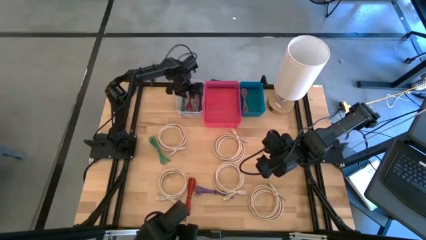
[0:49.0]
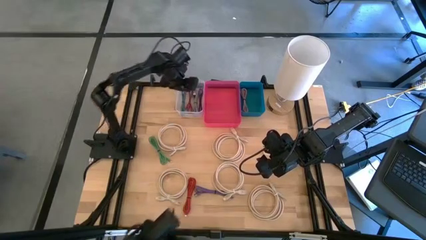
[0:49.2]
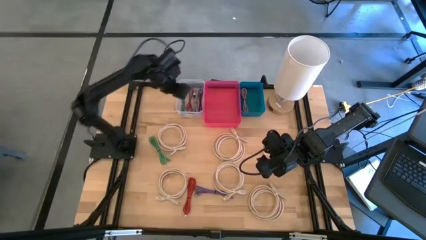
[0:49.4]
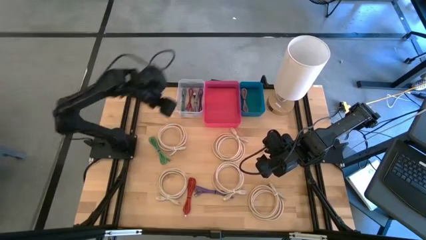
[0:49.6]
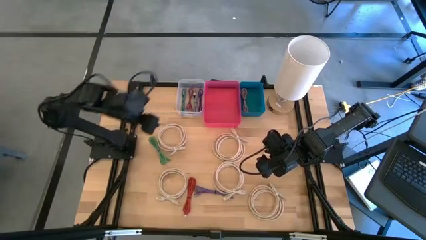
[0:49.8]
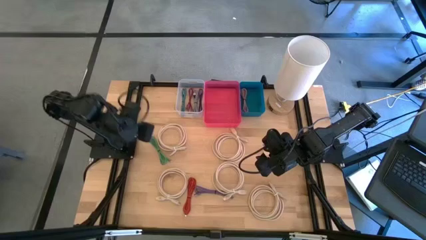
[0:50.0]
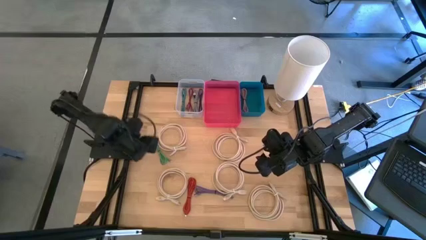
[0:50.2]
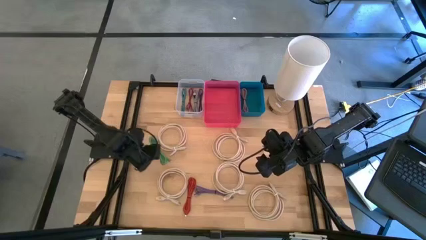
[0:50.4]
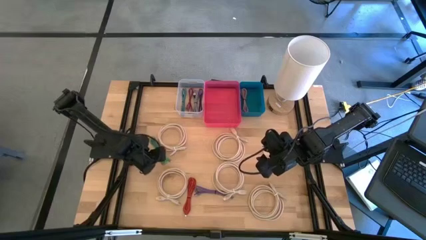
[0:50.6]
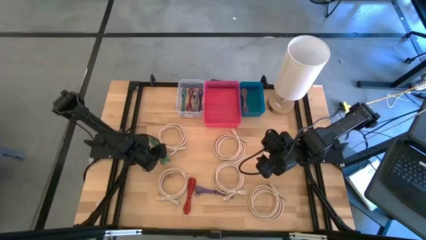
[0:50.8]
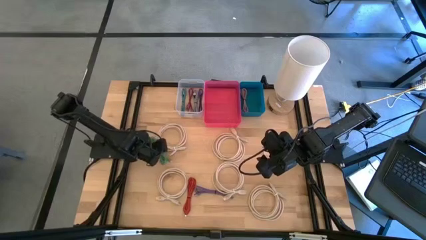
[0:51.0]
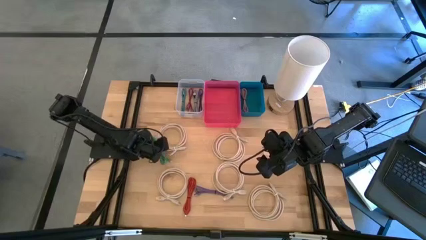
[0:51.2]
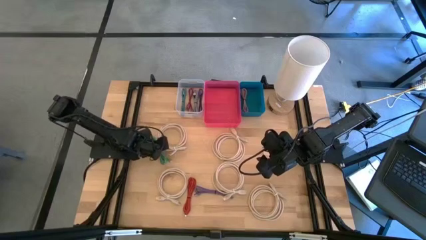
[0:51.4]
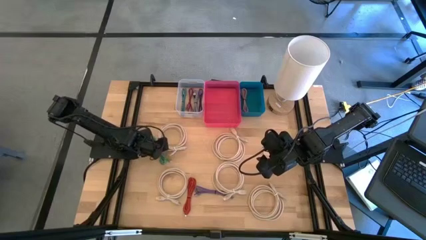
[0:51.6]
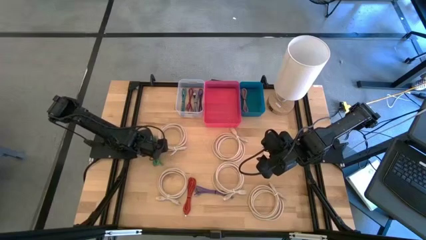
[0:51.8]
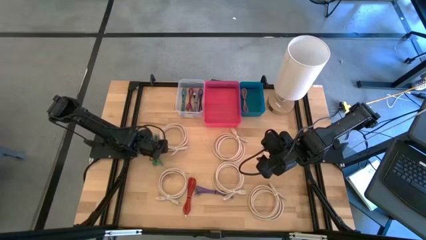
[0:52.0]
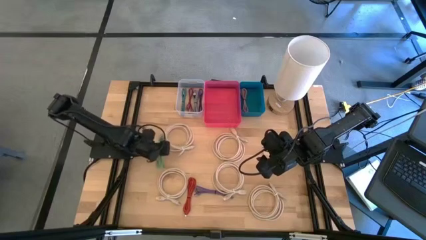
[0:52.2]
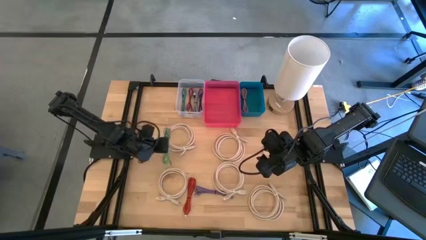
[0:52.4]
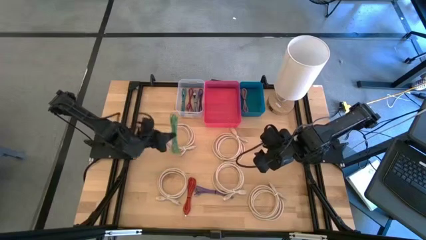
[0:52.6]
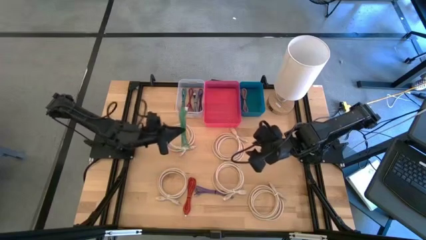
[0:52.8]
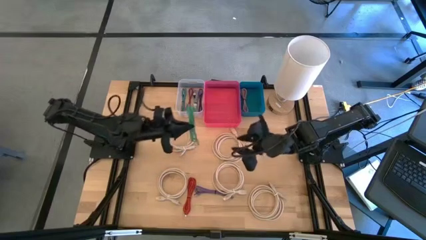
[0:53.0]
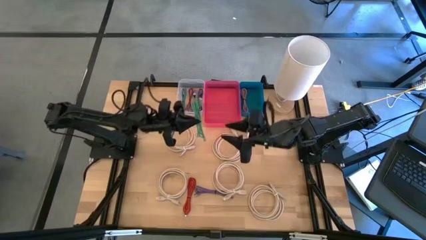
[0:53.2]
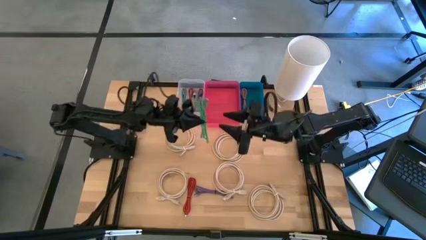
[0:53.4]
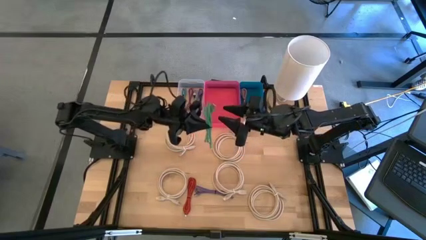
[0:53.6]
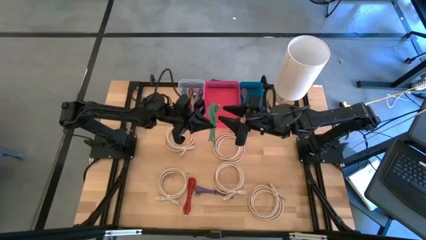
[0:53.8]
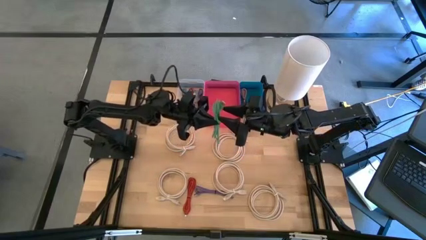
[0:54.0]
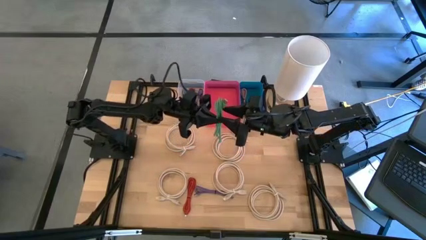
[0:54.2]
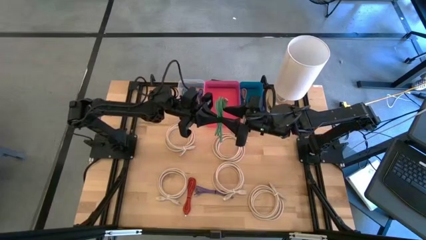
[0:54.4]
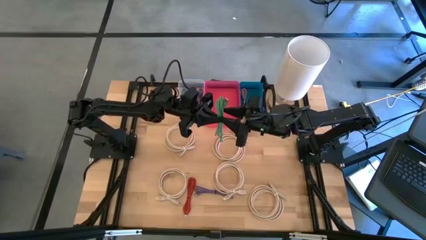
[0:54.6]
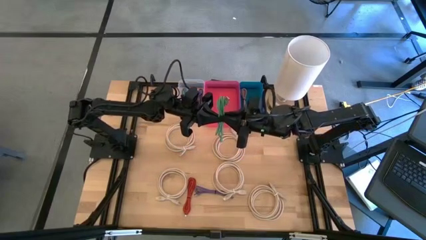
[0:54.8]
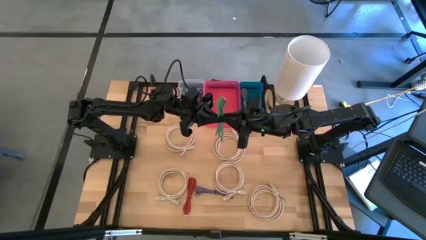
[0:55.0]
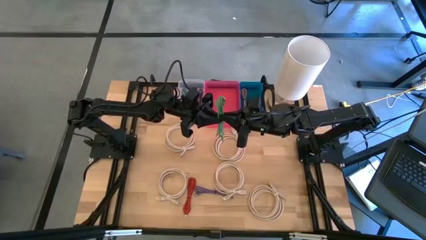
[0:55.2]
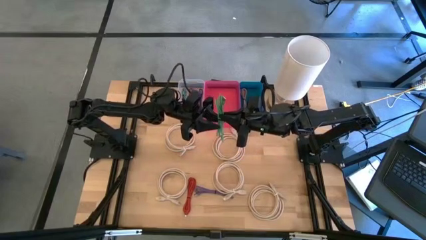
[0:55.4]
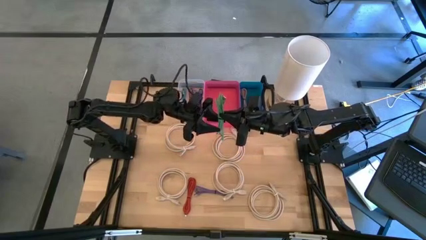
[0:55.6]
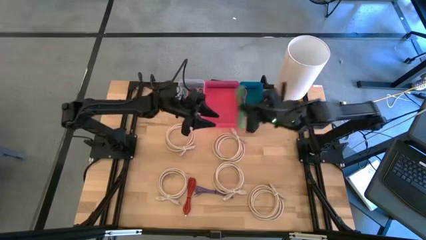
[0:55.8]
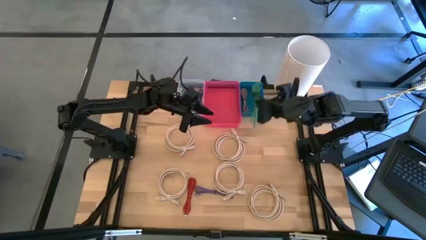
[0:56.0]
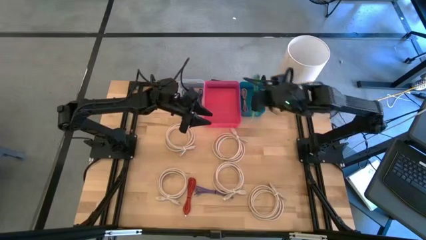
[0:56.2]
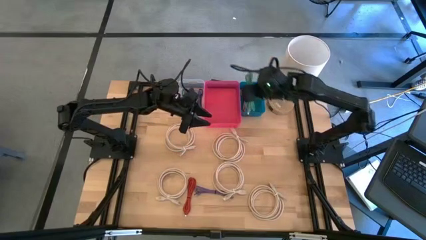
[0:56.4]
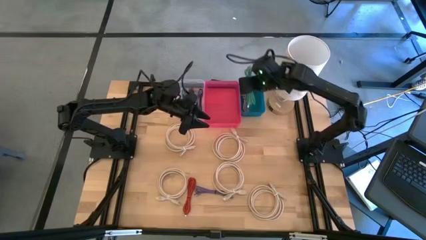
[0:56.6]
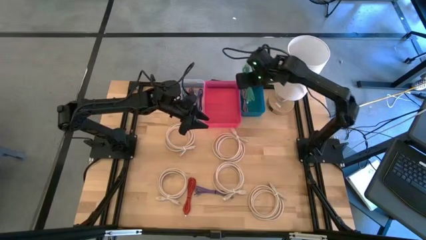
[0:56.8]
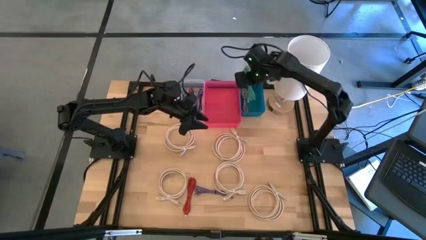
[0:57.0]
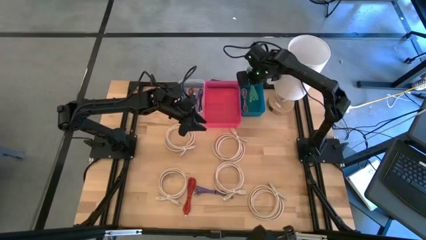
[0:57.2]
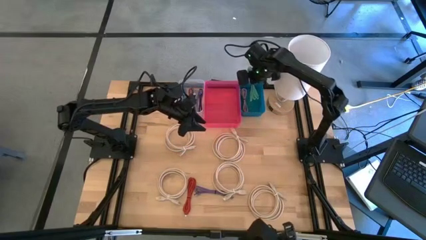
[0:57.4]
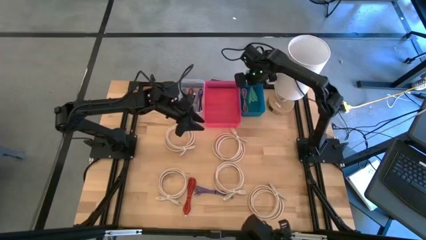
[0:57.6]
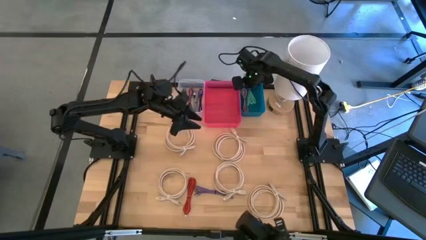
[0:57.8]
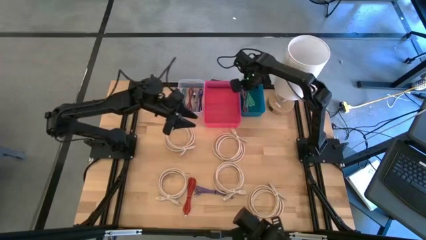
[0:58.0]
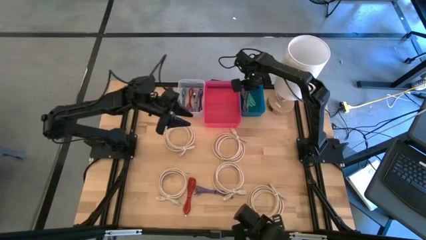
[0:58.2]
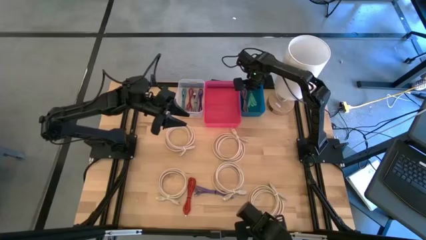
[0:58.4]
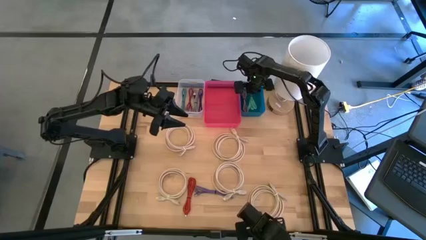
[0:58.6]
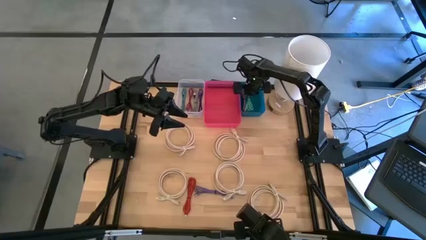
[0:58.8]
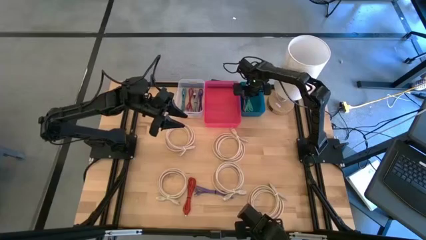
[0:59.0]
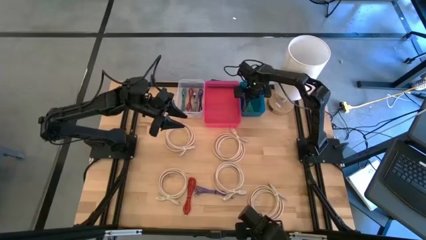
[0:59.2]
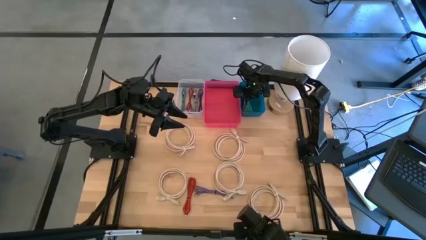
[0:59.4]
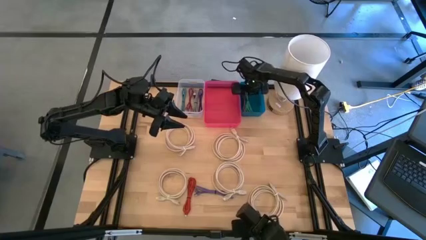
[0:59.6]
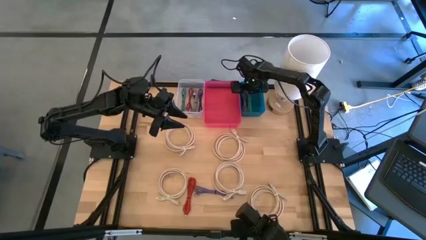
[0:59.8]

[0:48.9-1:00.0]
Task: Pick & Place USB Port
Put the green USB cable into the blue bin

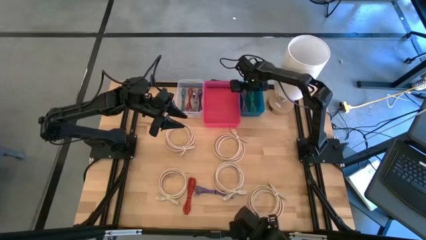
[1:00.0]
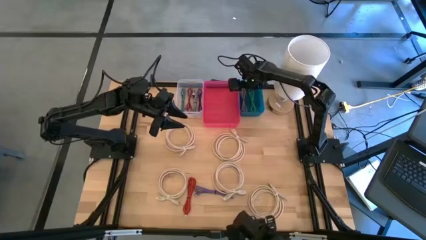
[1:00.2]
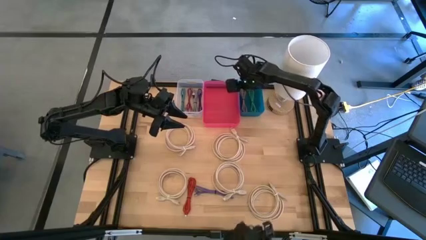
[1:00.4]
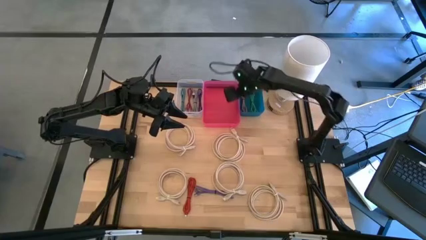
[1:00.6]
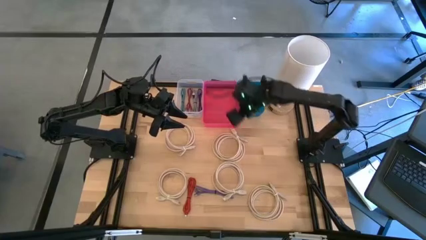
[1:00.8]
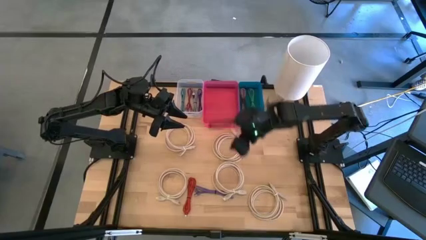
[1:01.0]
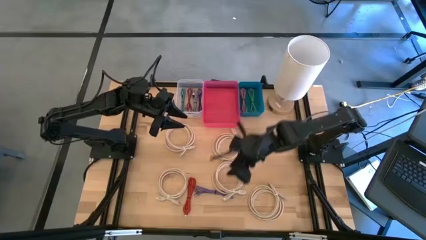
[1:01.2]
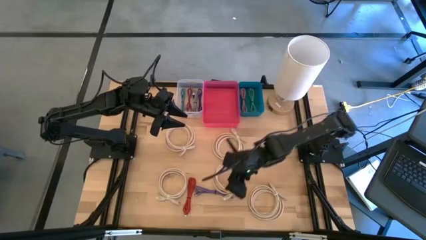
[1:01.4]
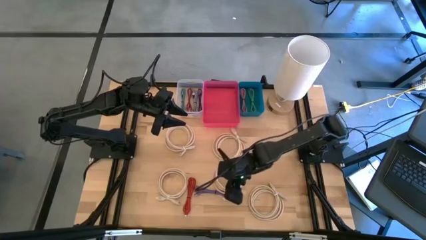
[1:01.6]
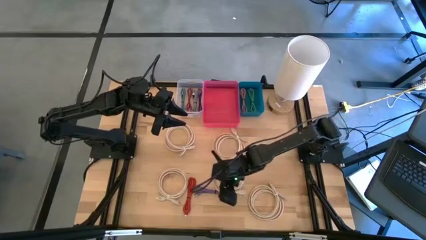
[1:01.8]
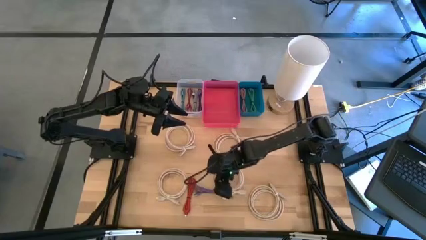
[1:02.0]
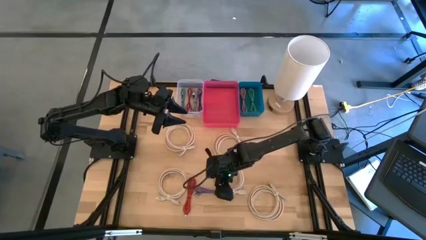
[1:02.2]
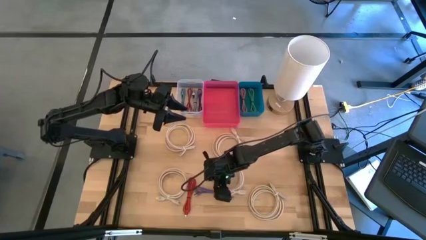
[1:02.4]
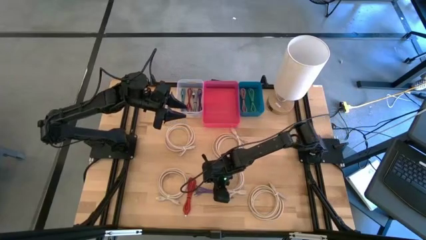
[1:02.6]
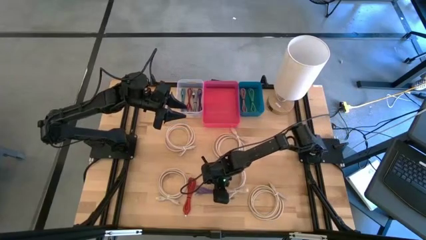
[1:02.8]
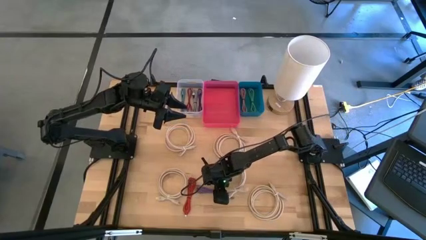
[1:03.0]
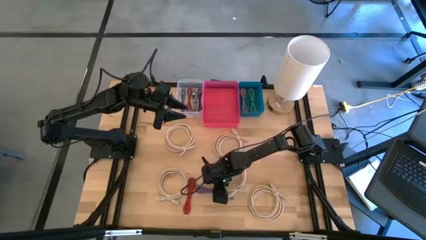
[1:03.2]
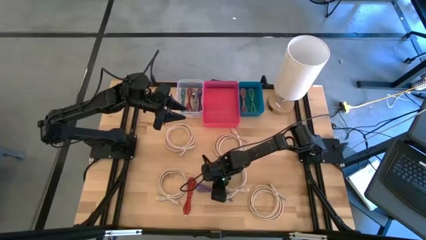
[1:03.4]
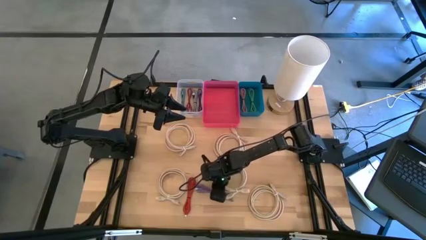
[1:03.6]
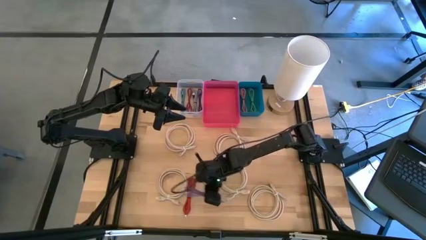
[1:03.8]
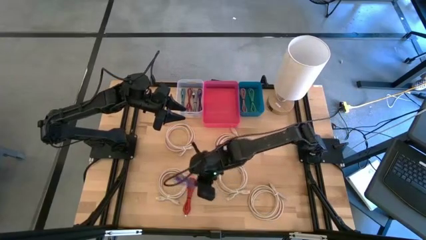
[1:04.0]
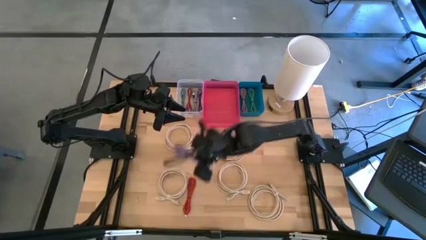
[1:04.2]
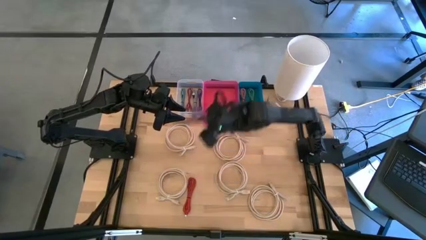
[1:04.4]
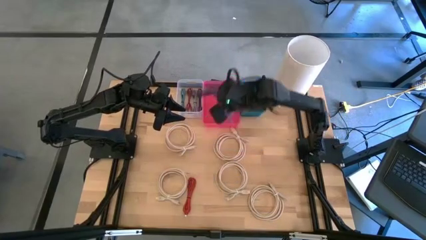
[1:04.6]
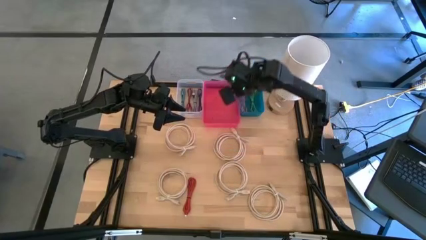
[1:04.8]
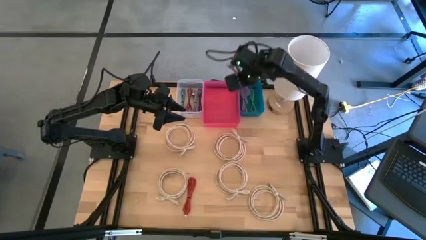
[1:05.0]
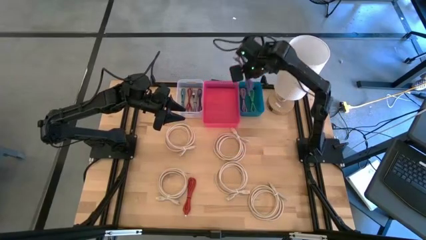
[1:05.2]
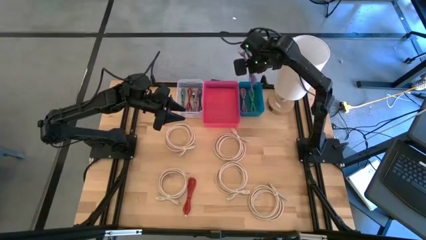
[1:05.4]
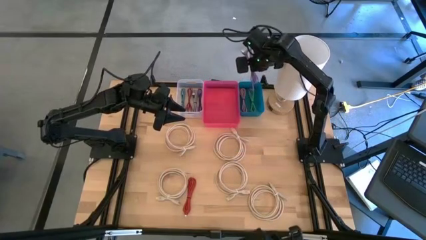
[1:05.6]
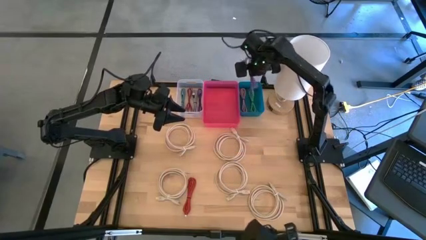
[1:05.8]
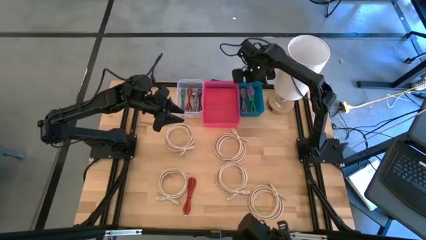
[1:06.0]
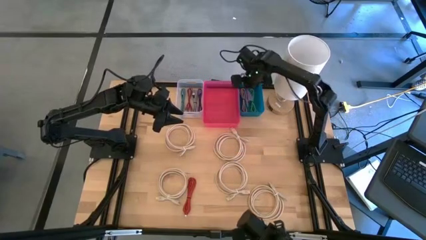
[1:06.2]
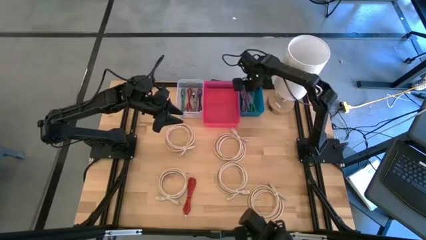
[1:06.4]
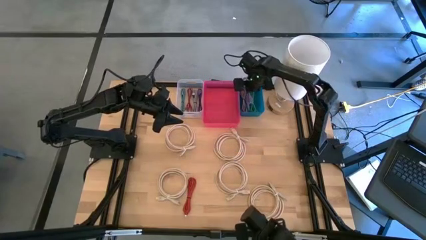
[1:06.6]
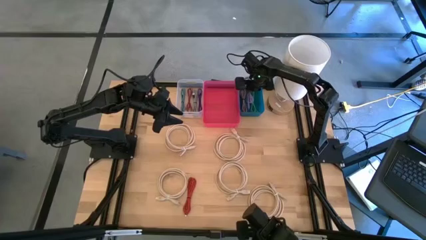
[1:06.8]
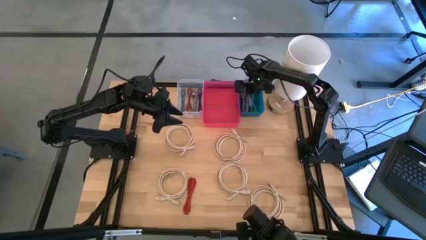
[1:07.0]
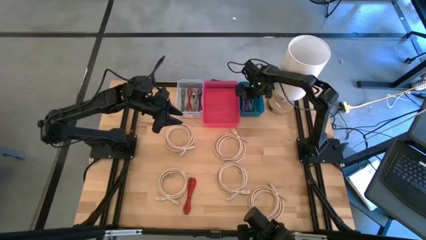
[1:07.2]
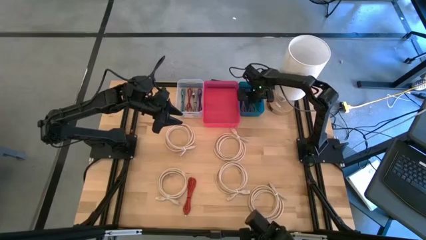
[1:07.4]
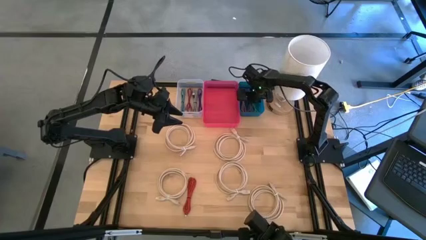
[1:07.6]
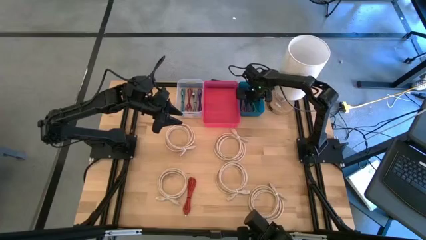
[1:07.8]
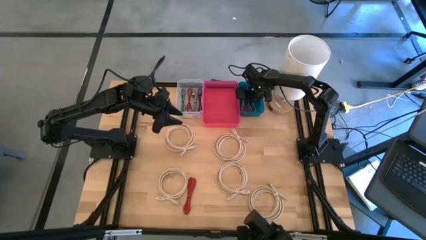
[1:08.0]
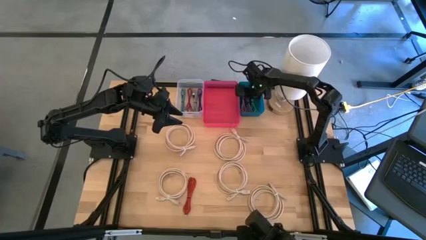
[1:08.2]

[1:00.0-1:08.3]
Put the purple USB cable into the blue bin
